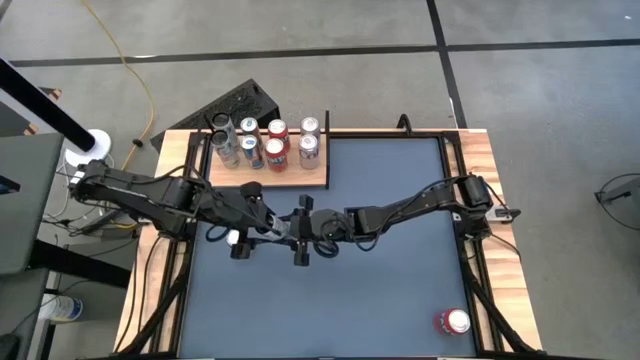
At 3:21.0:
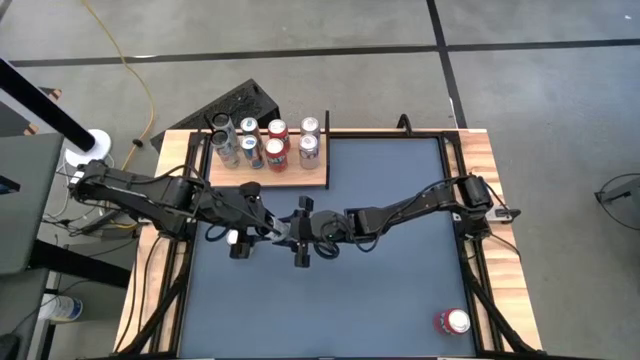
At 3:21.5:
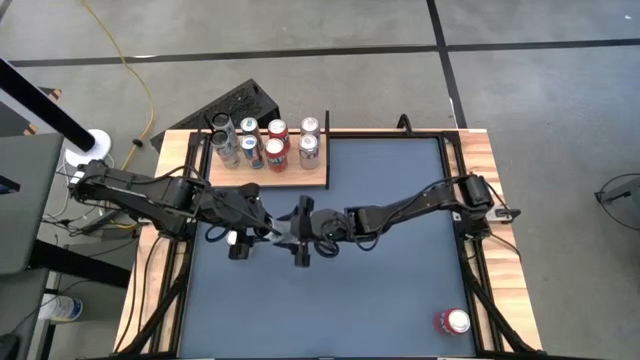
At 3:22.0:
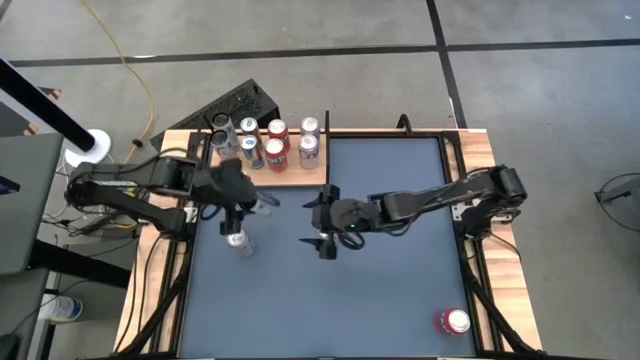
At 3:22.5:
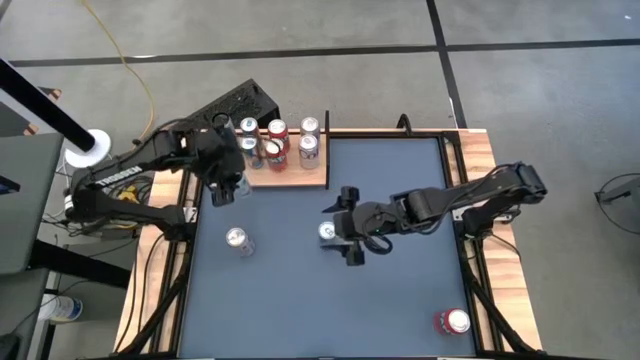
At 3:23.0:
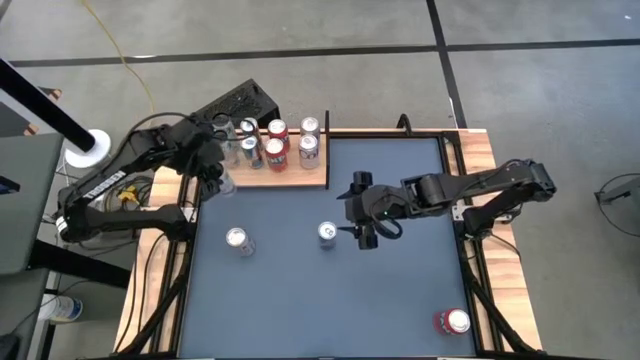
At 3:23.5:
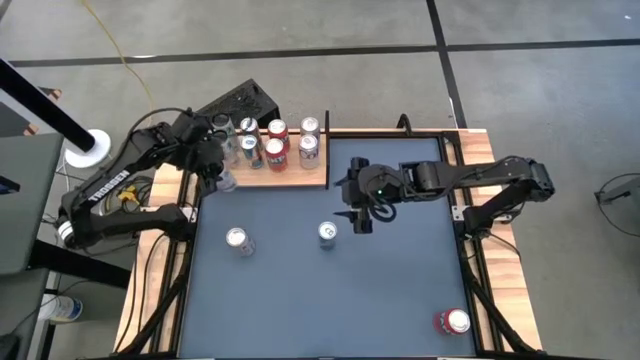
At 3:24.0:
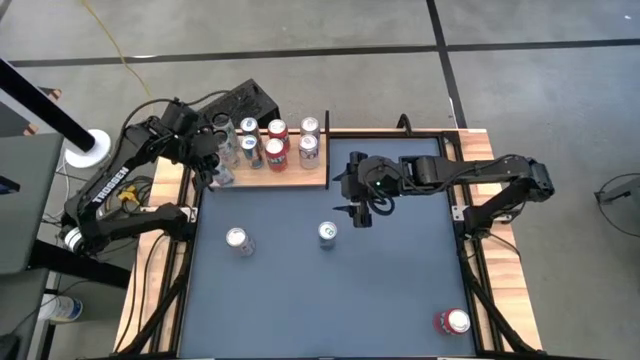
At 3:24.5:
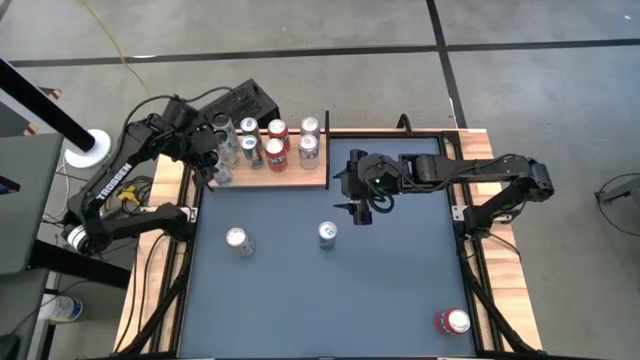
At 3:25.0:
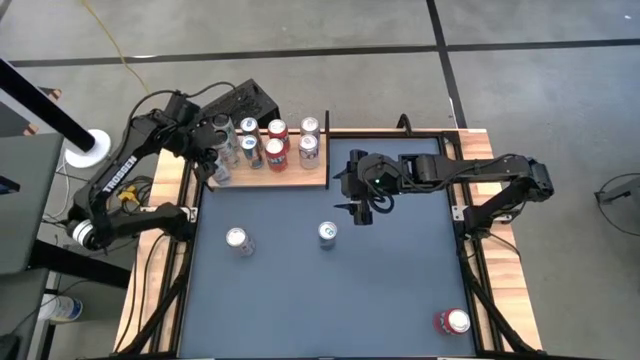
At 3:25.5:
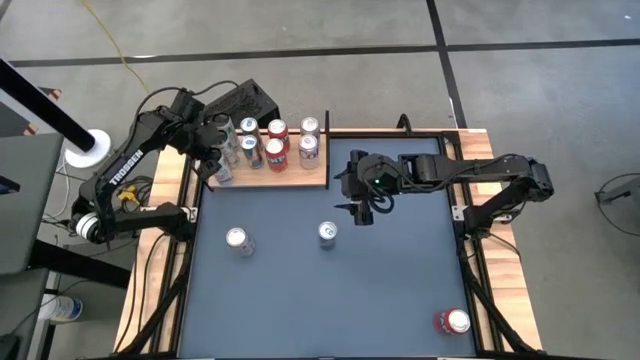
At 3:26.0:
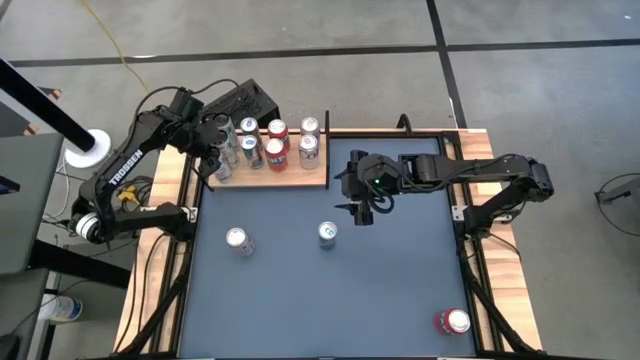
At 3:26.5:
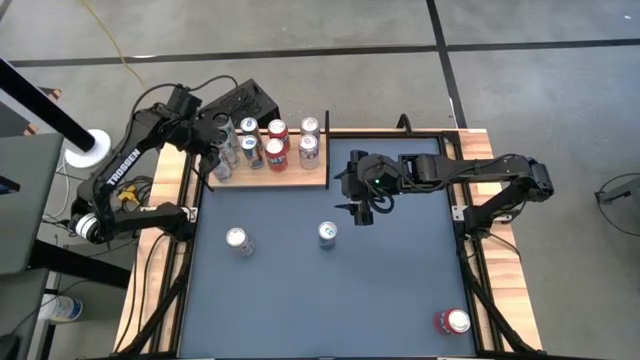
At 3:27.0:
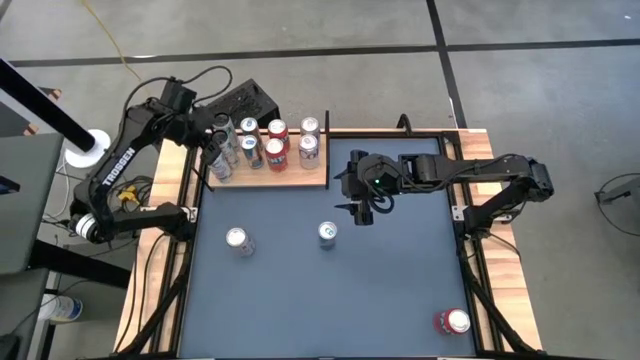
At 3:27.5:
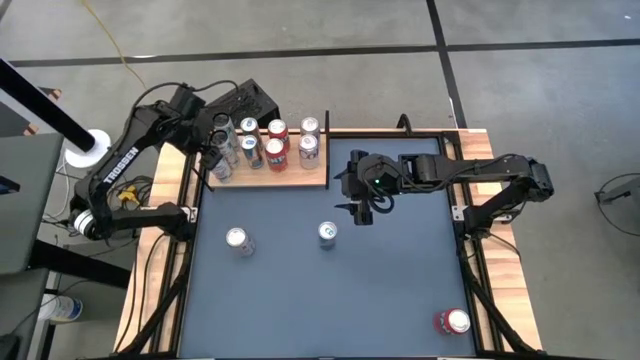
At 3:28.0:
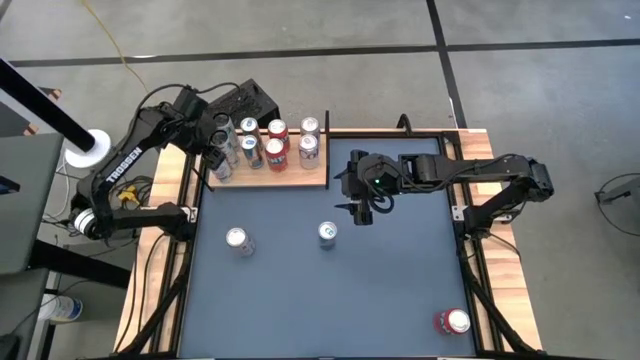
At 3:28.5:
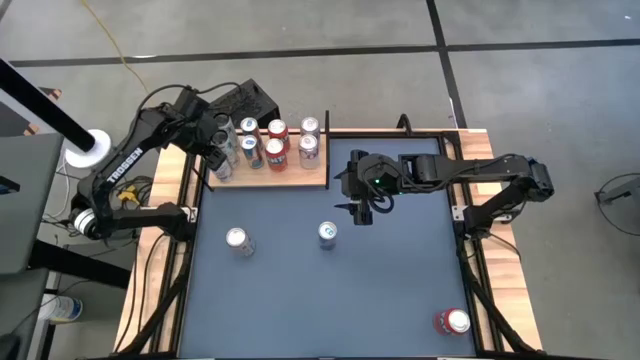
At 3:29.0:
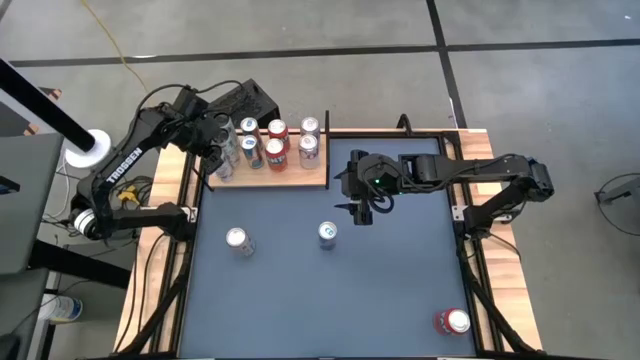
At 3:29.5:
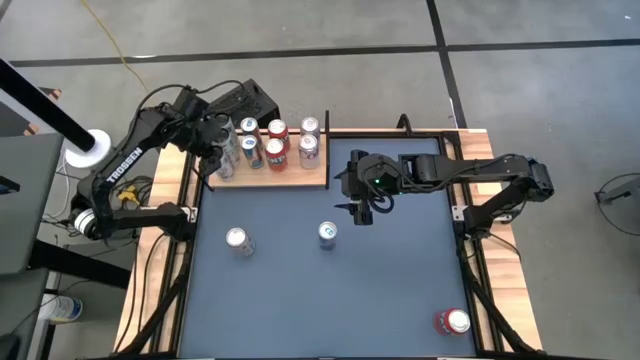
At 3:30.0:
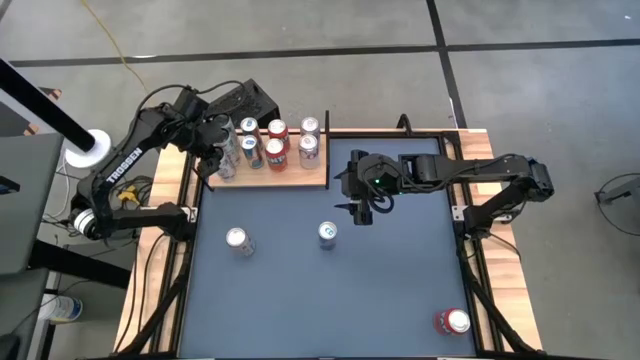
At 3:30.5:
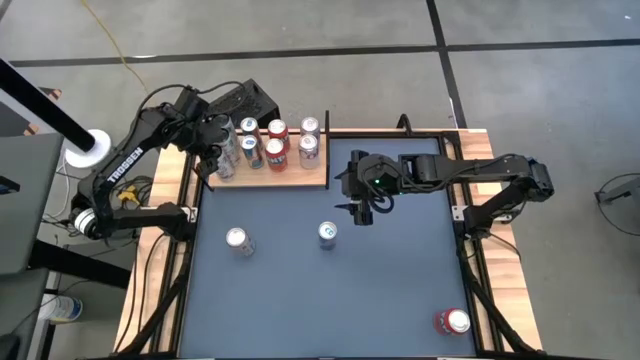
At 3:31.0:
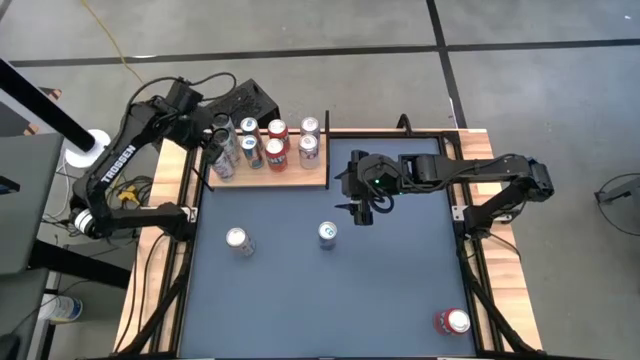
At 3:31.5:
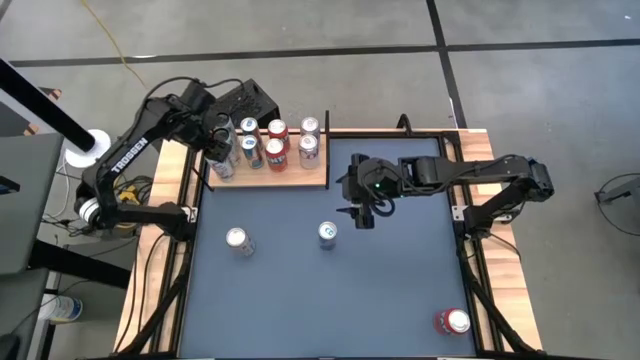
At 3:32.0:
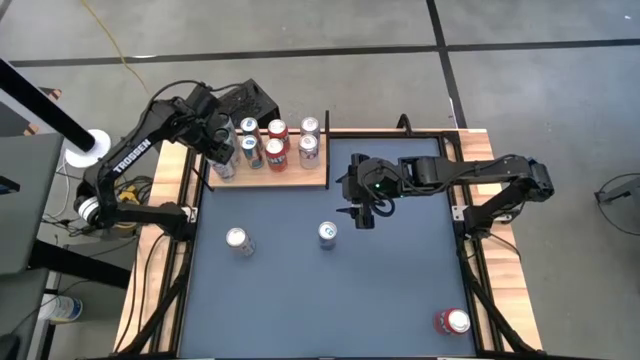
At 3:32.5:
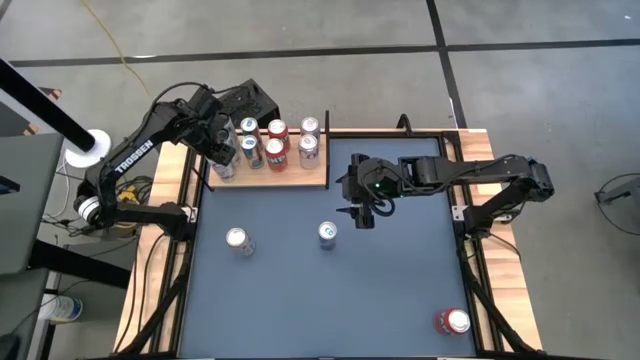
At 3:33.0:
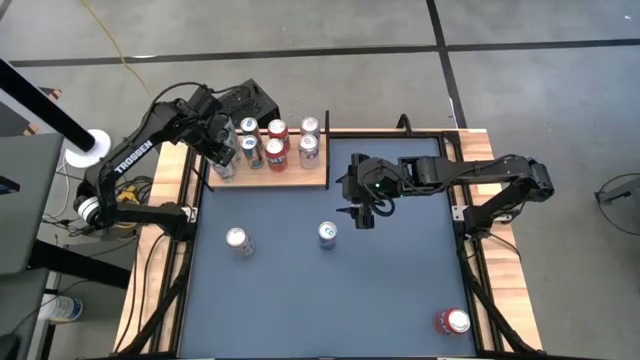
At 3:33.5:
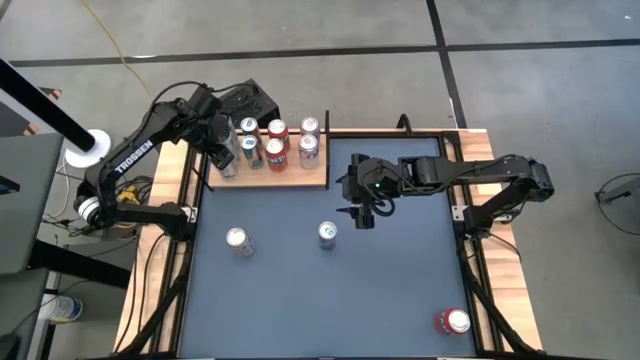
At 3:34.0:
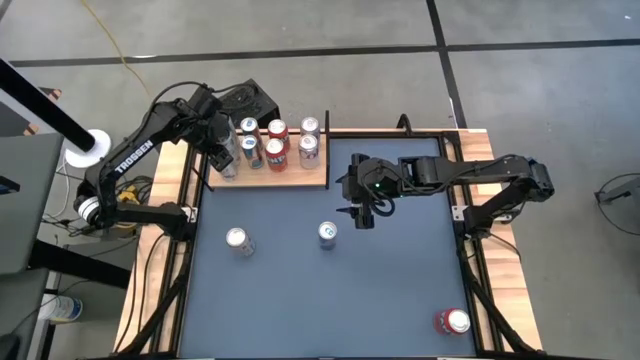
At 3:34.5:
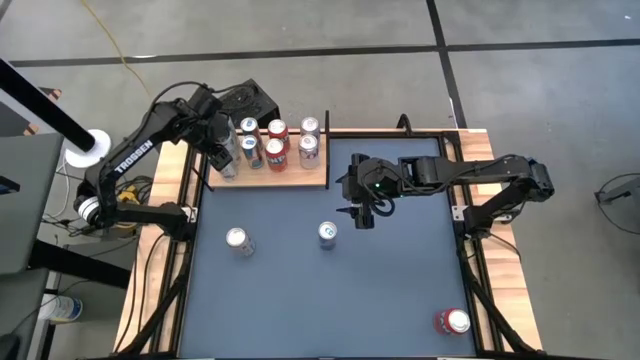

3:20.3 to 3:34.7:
Task: Place canned beverage on shelf
Put the white pink soda can on the shelf aligned with the other white pink soda cans

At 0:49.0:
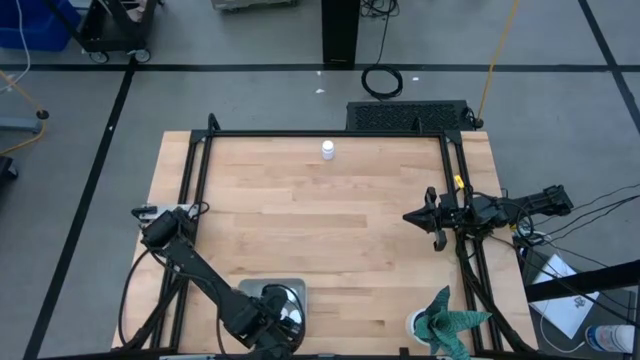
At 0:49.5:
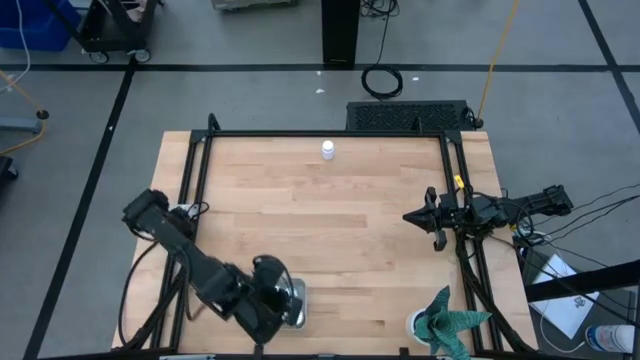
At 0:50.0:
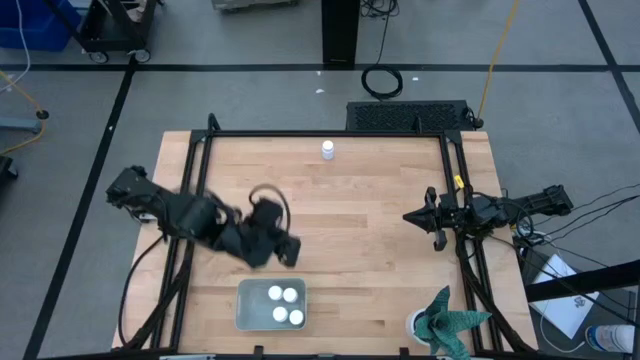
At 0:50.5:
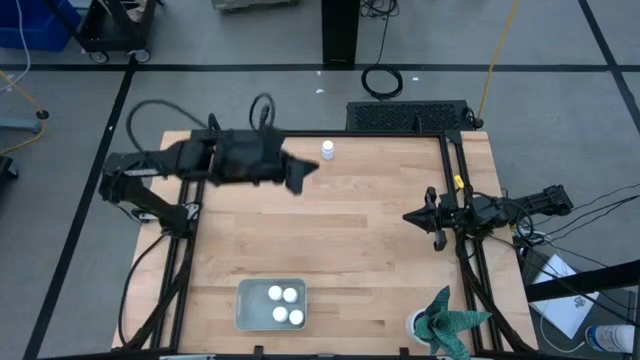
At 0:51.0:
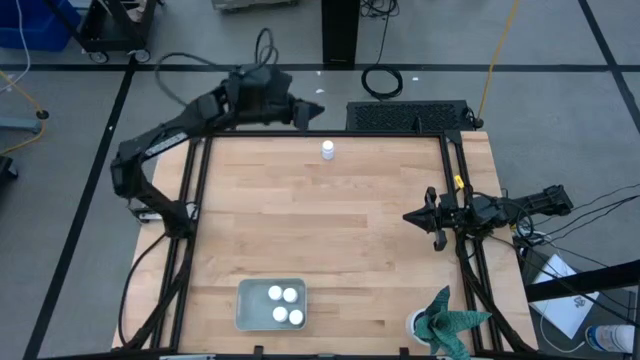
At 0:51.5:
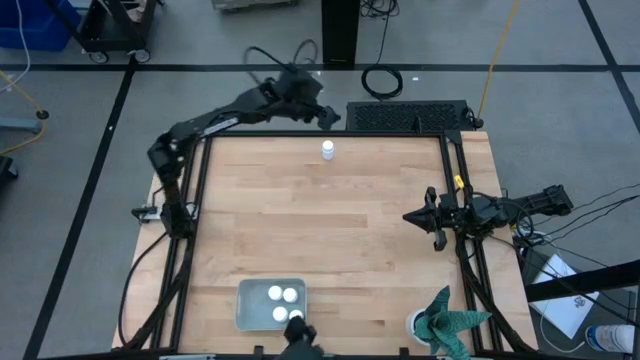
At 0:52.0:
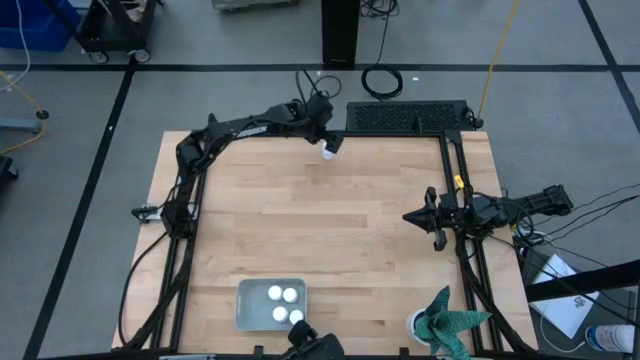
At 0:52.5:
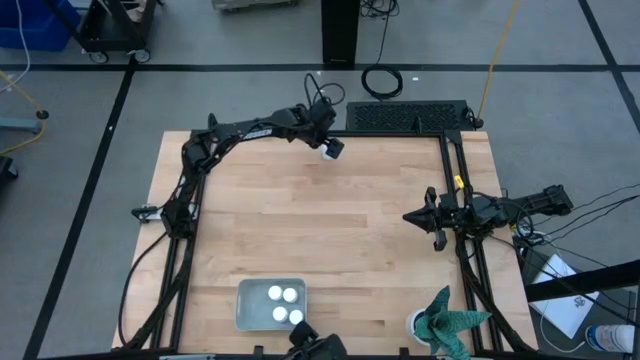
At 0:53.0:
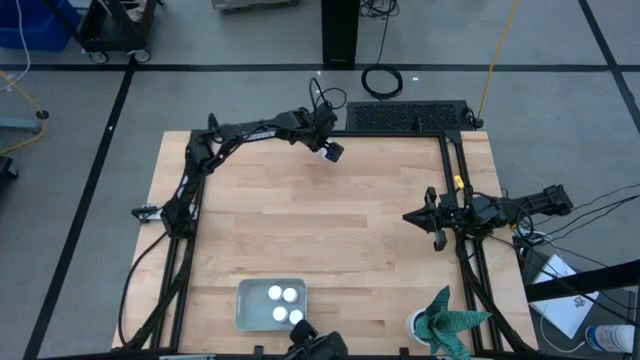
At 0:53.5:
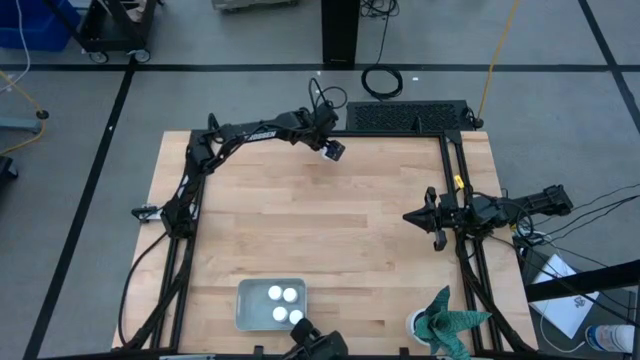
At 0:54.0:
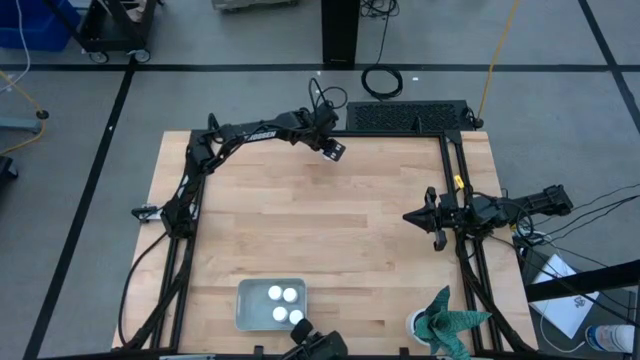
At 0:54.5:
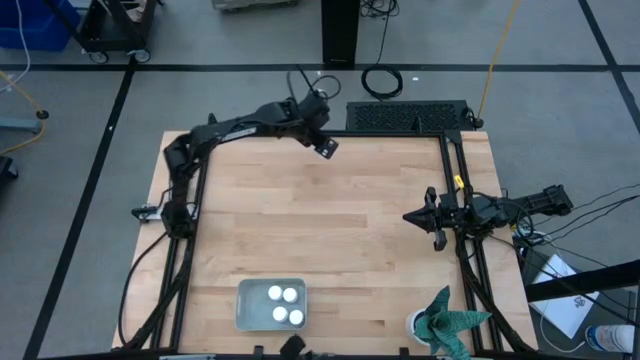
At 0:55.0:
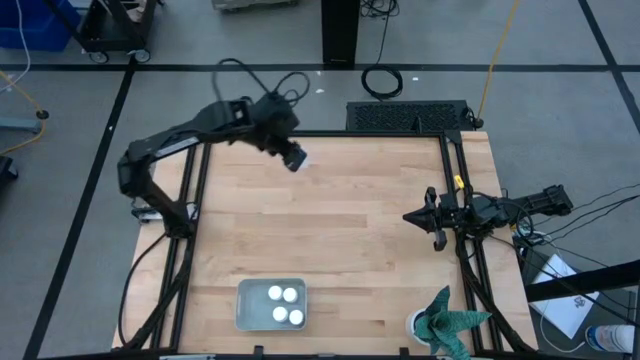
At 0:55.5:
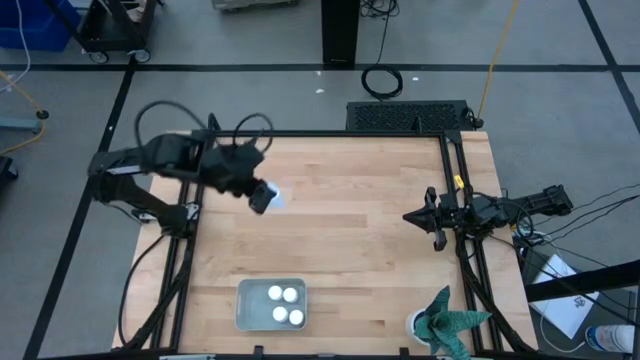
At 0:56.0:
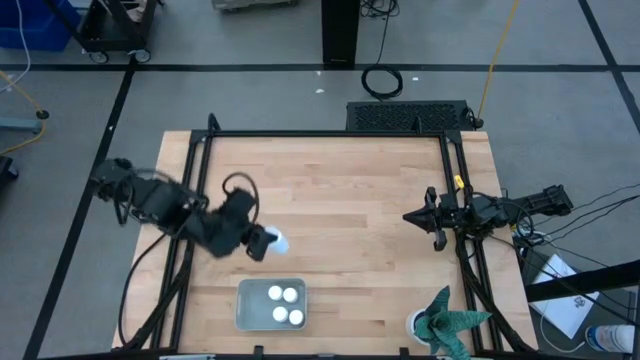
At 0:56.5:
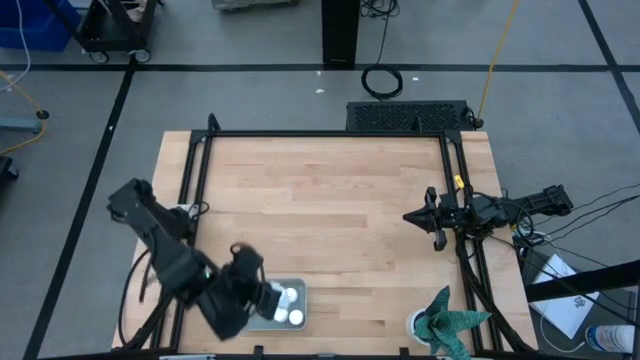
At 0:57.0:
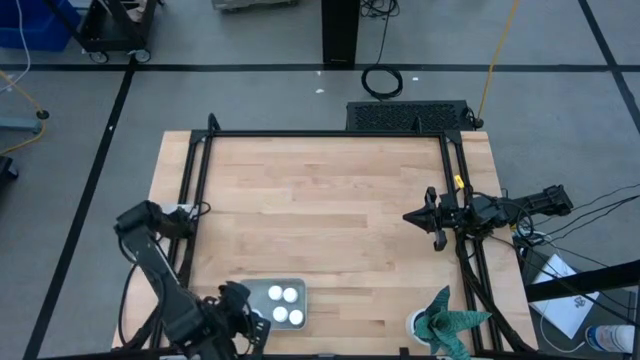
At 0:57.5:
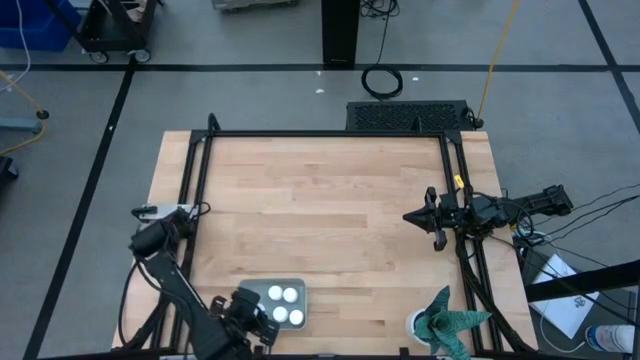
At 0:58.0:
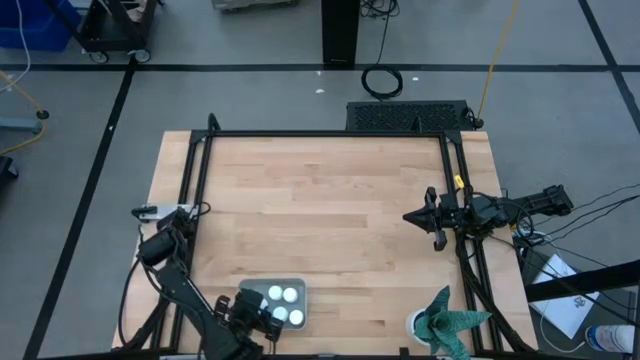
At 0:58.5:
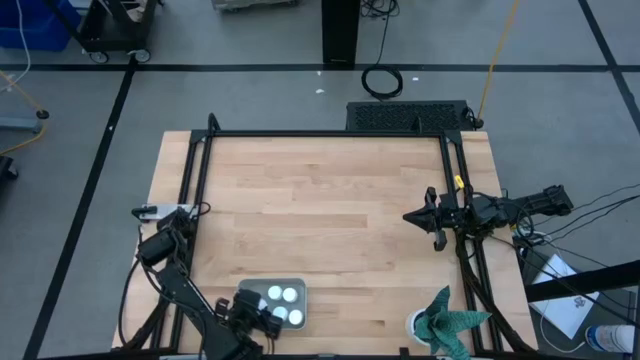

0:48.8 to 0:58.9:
Task: Pick and place pill bottles into a basket
Put the white medicine bottle into the gray bin
